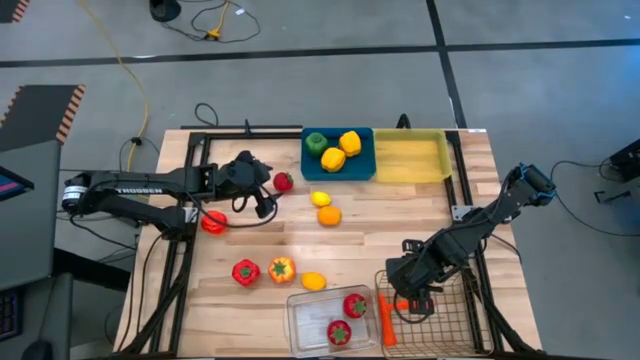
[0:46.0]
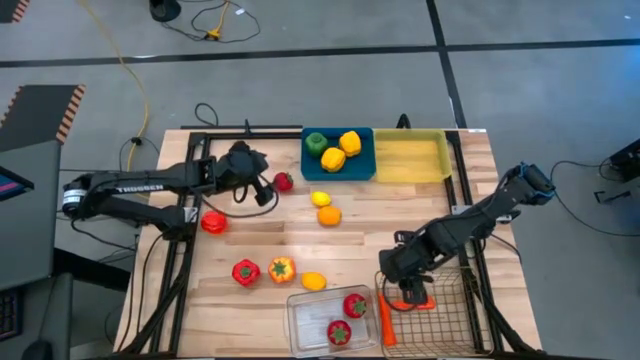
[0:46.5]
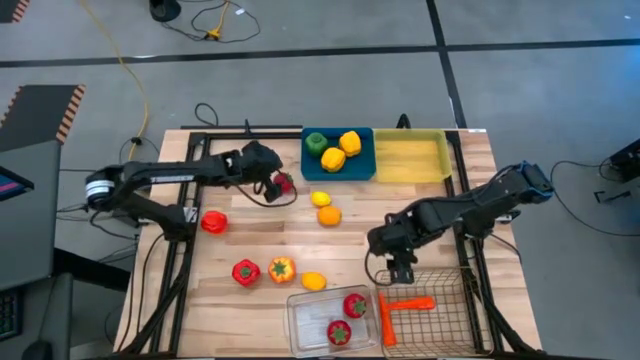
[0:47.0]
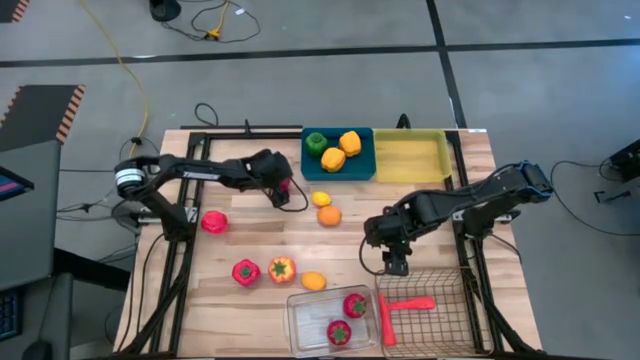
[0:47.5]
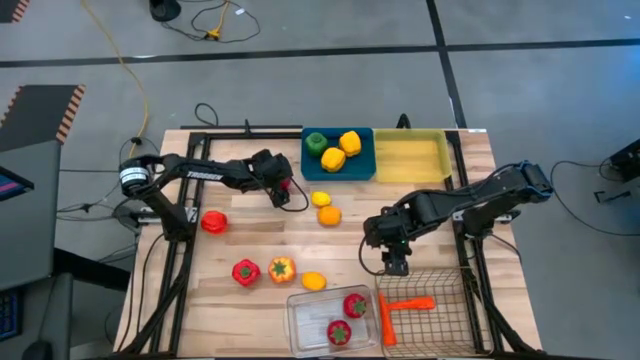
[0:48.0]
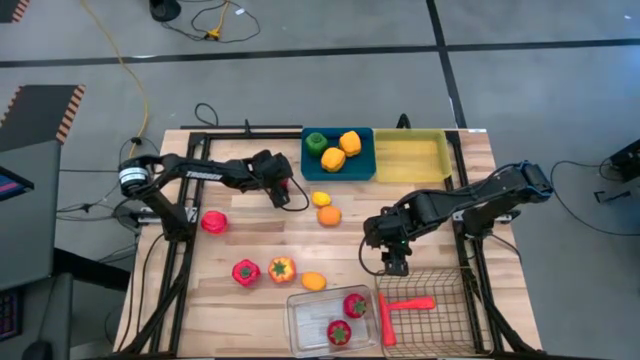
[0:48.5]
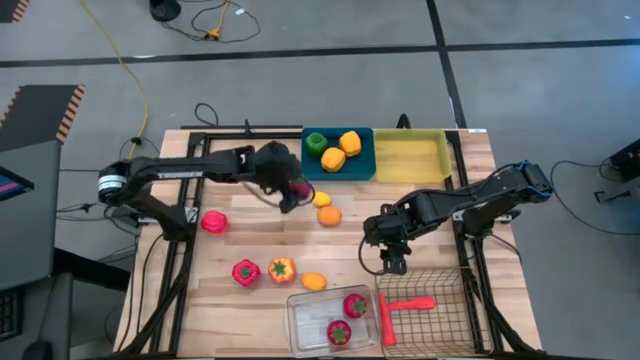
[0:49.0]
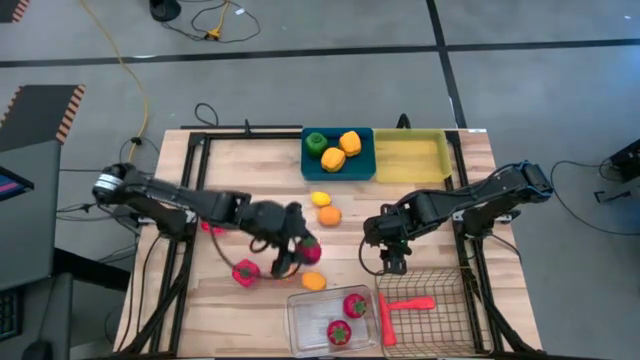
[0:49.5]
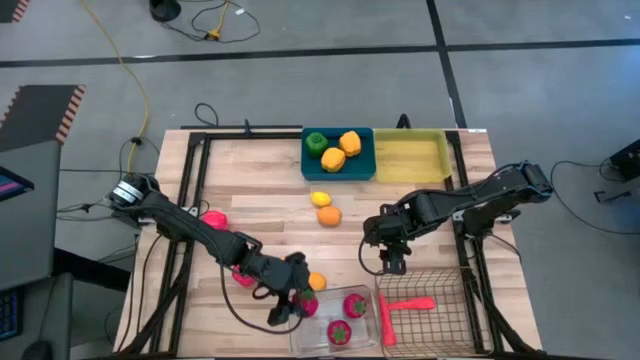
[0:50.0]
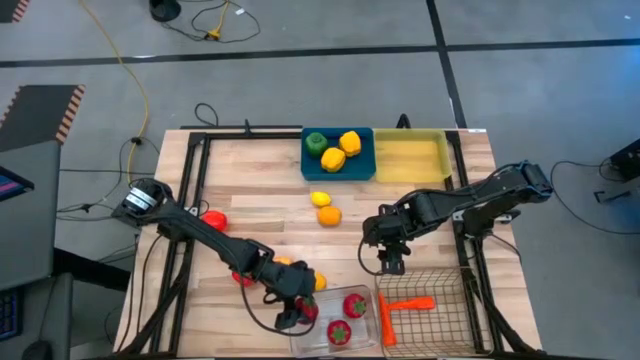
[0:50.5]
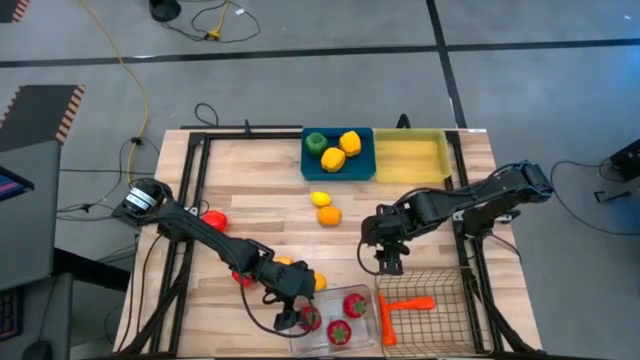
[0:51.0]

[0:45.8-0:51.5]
Task: Sort produce into baskets
Put the tomato into the transparent bin

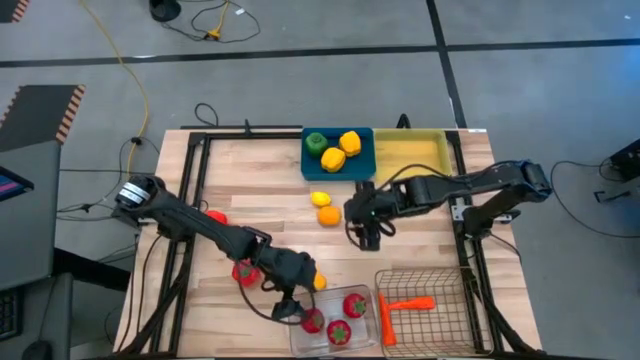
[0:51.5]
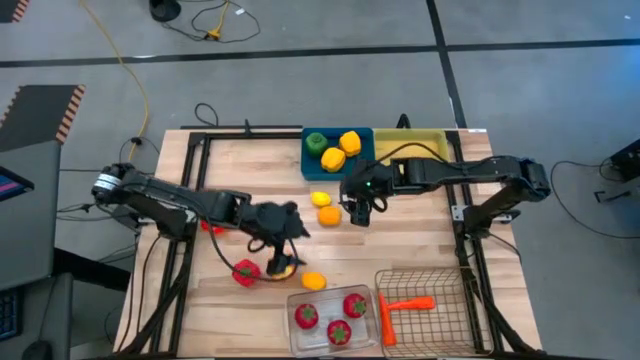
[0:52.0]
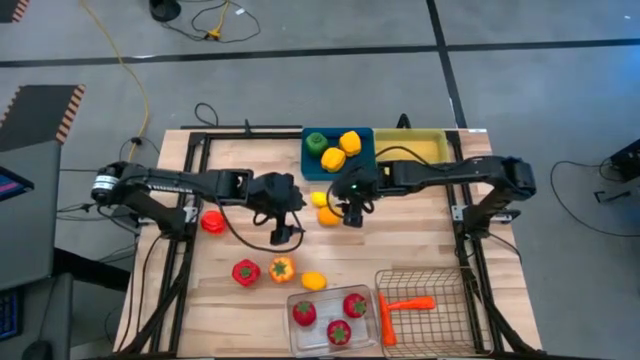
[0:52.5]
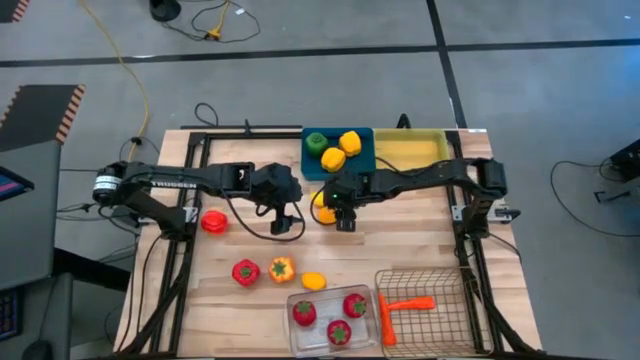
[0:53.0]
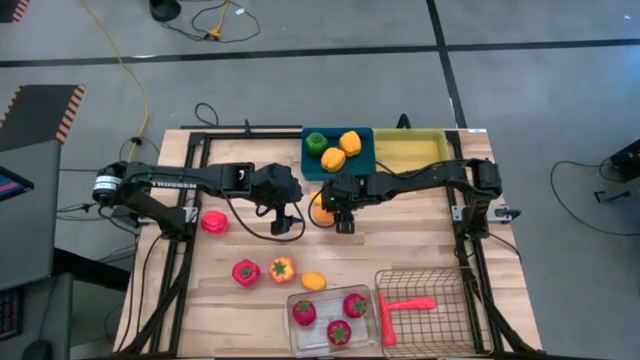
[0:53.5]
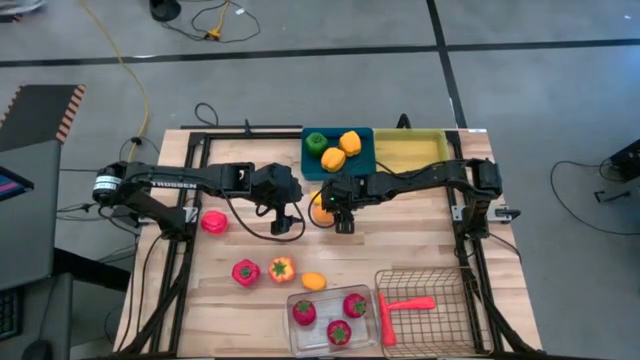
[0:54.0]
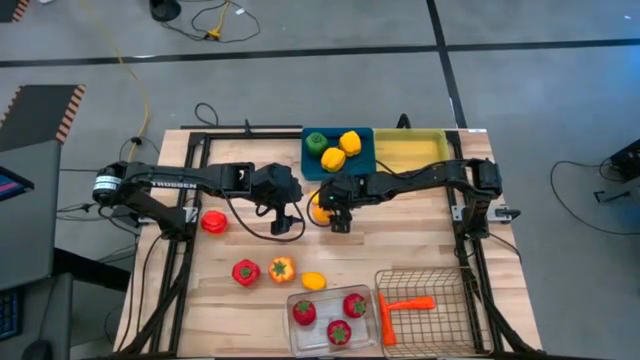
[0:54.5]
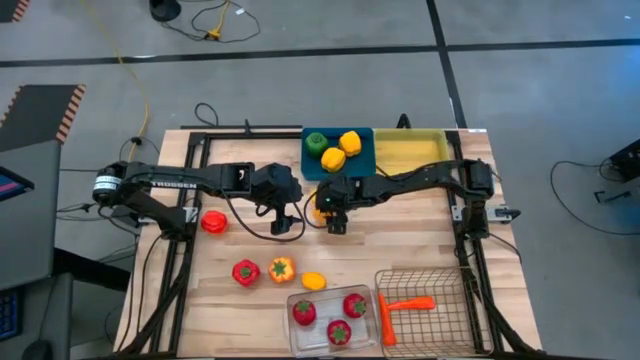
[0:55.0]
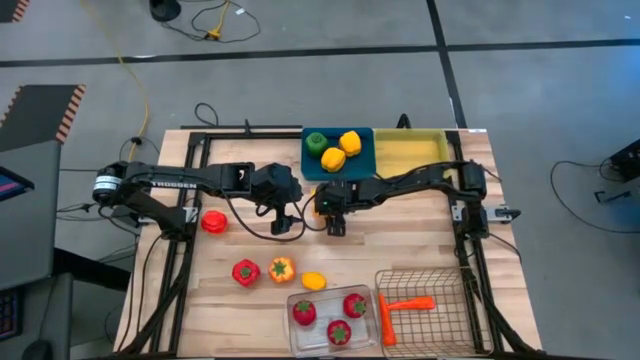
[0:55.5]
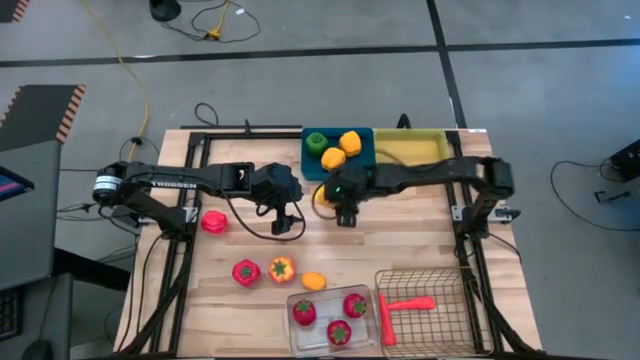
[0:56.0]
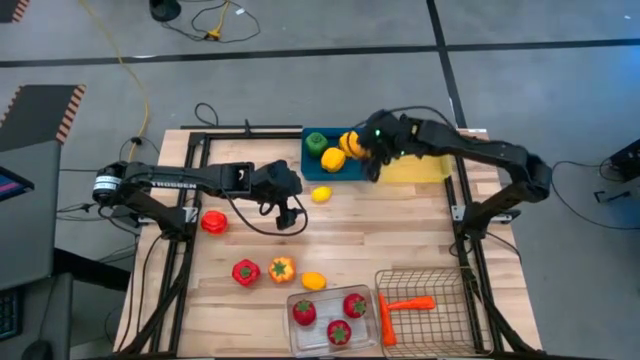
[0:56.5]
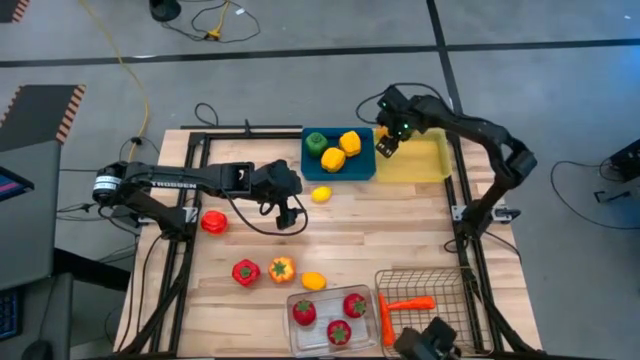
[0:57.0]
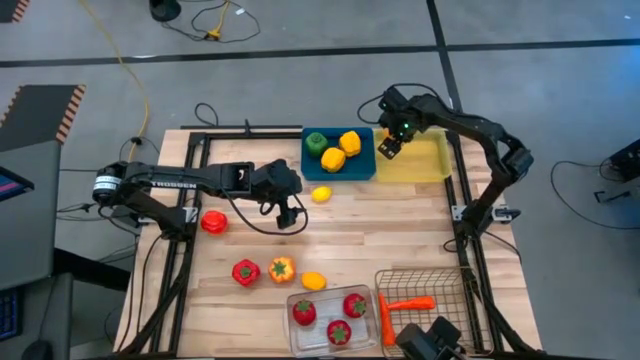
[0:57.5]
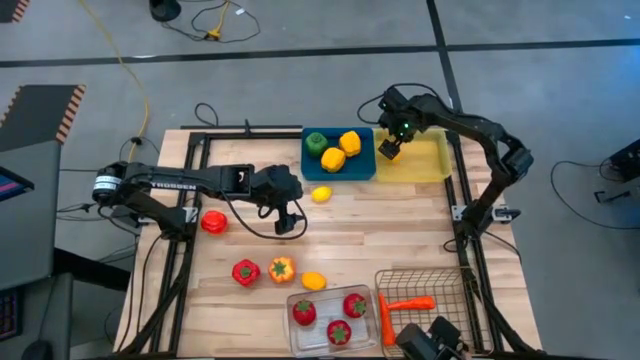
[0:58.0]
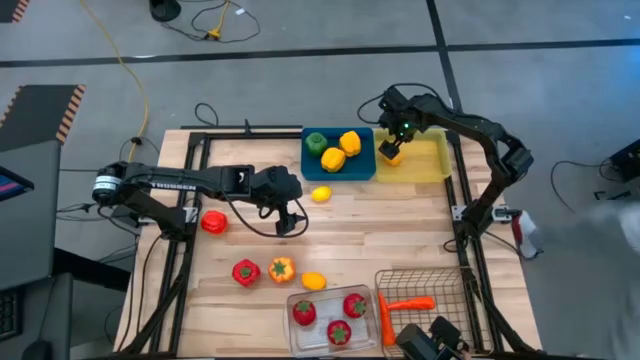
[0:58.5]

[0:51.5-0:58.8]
Put the lemon into the yellow bin

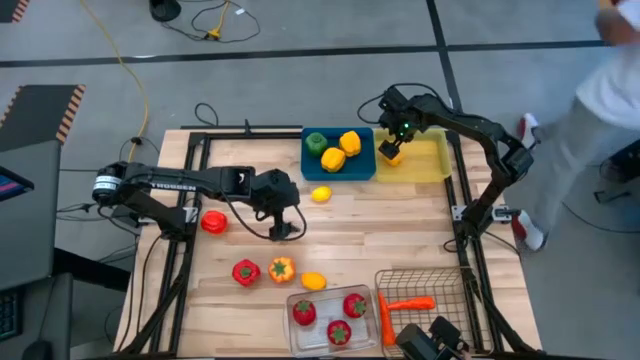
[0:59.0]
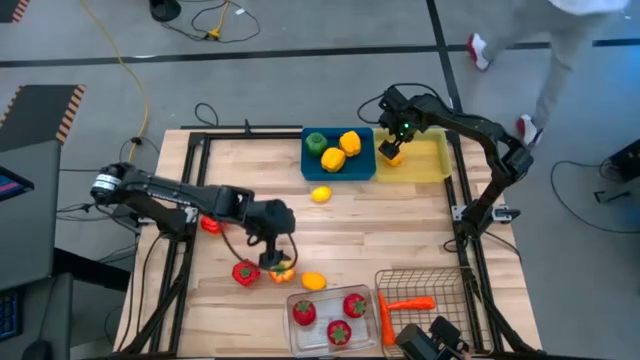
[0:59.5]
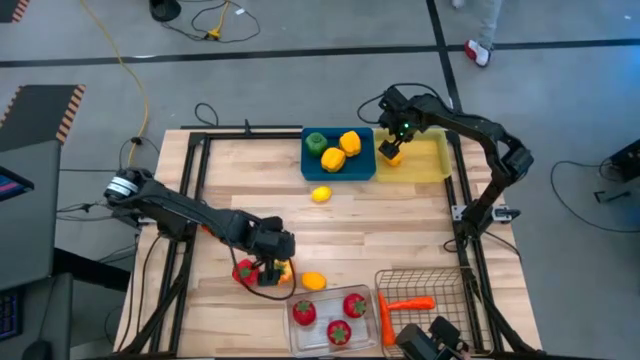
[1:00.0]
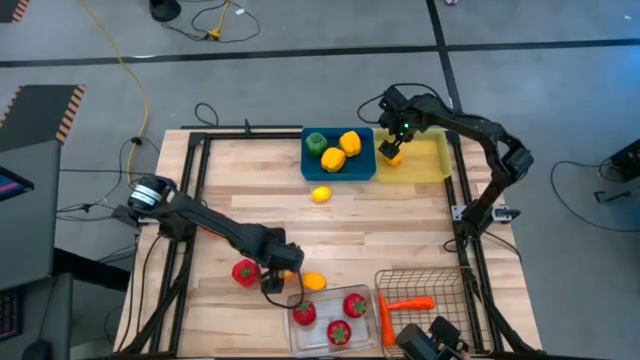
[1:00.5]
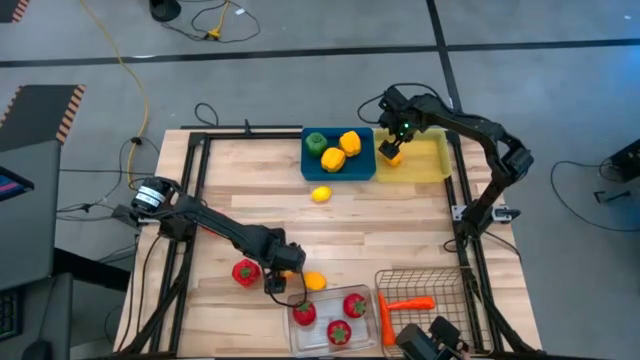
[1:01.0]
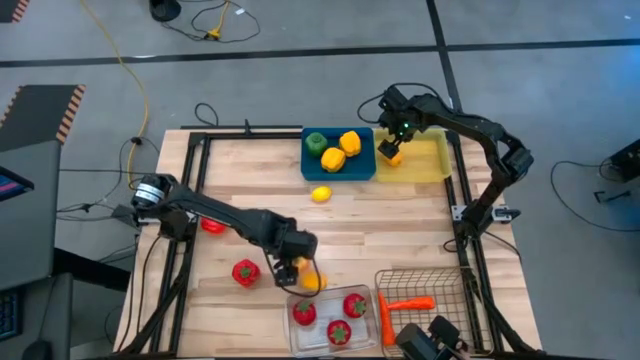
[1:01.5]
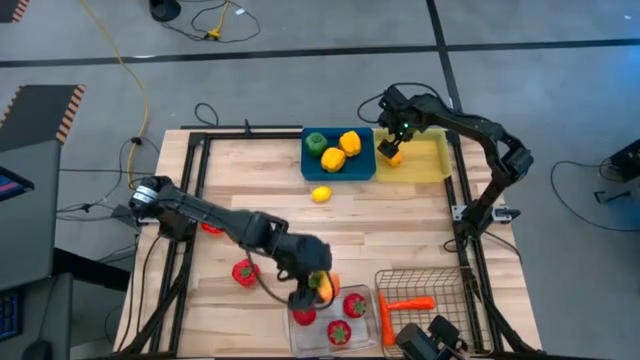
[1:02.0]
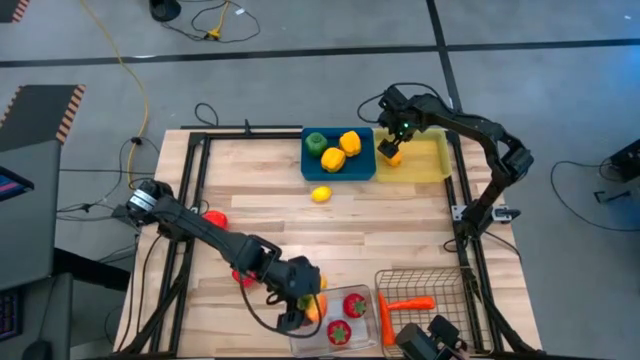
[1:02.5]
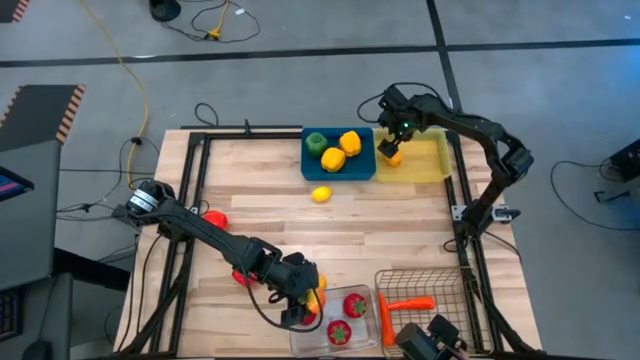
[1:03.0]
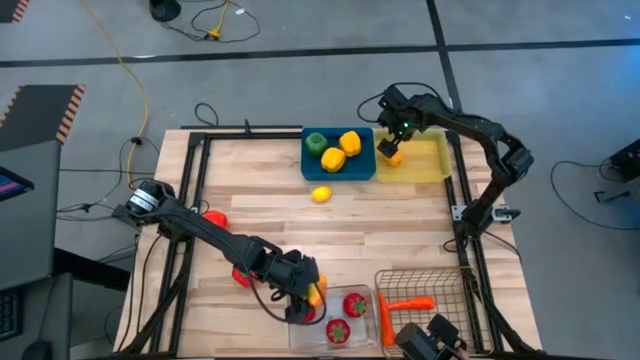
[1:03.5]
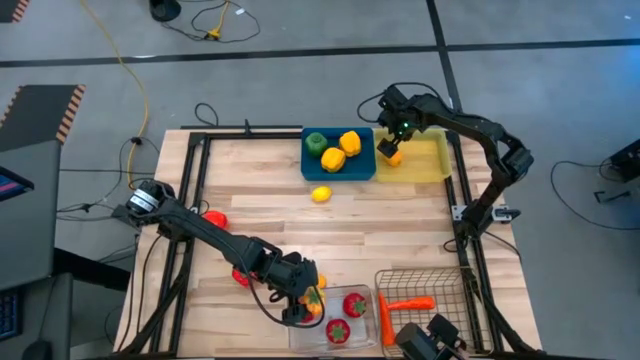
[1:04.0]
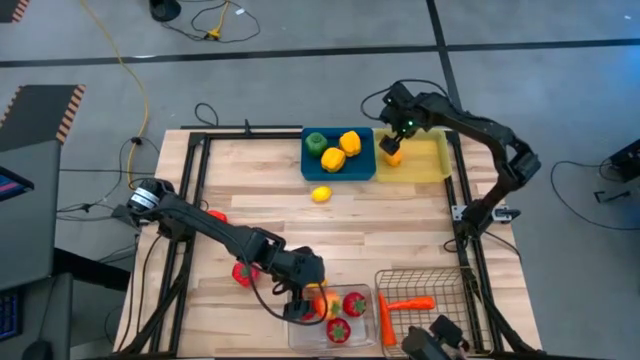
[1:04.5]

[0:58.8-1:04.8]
Put the yellow tomato into the transparent bin

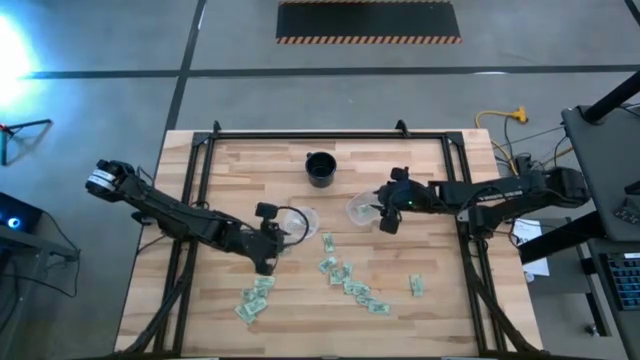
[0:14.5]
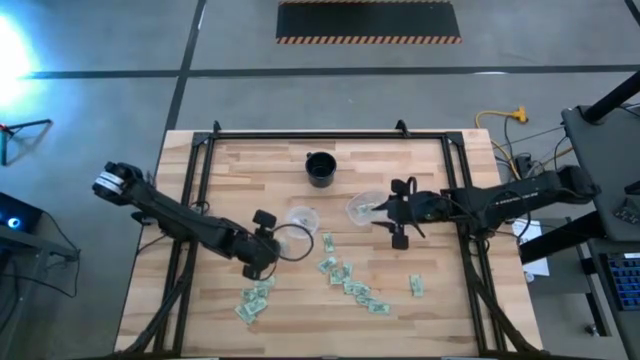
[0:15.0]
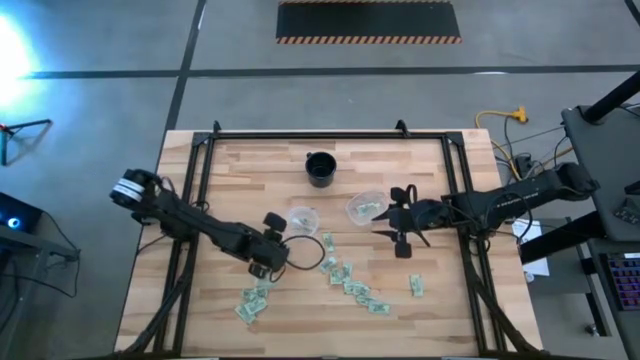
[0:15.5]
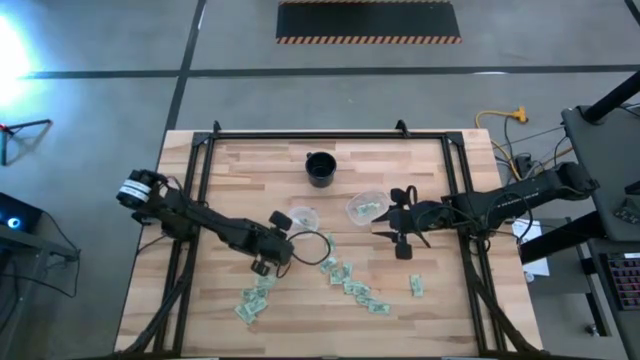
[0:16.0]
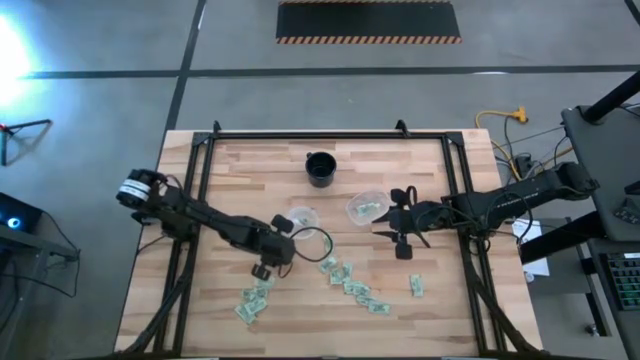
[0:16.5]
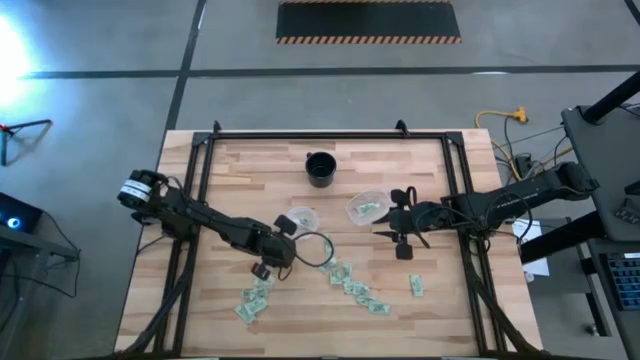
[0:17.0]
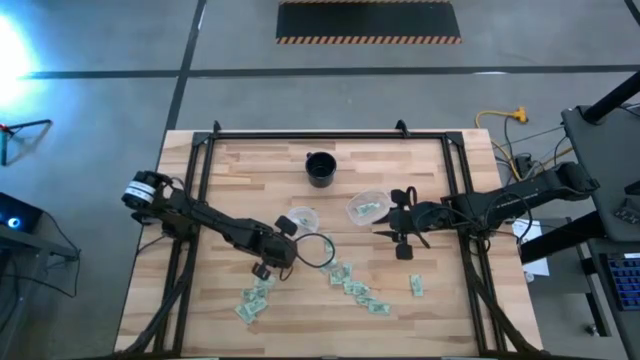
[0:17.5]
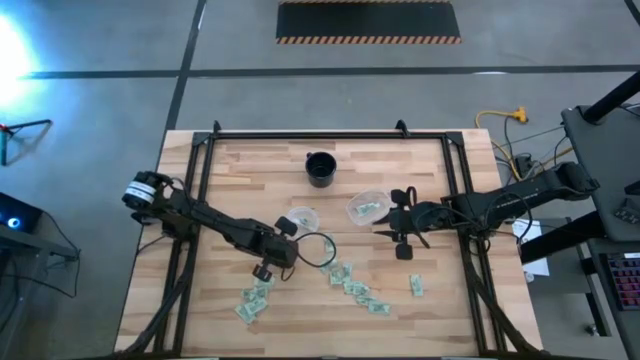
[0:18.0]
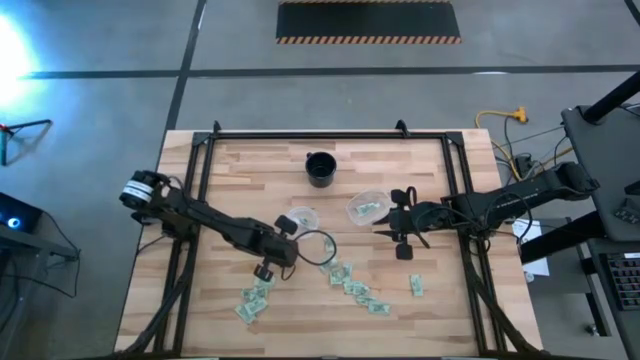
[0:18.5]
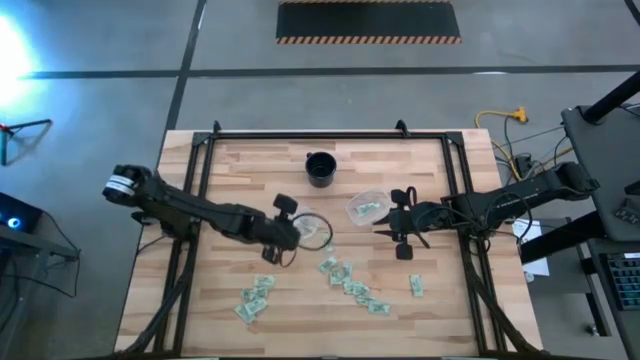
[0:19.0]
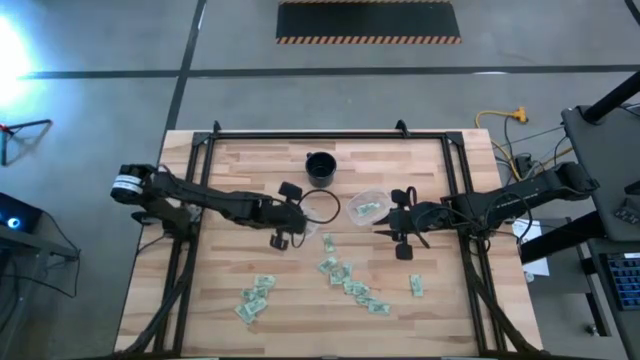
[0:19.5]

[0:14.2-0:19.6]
Task: Pick and place Stevia / Truvia into bins
Put the green stevia packet into the left transparent container
